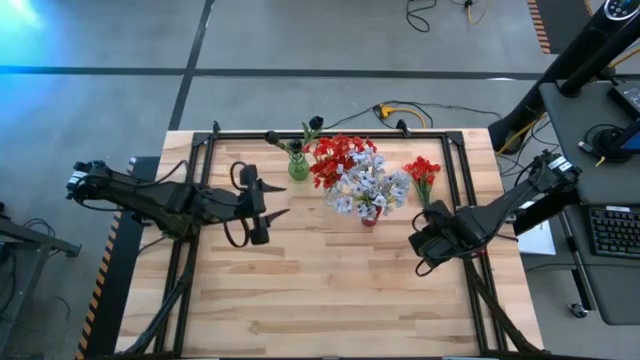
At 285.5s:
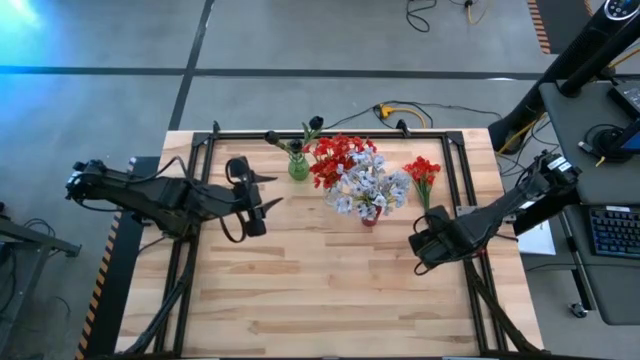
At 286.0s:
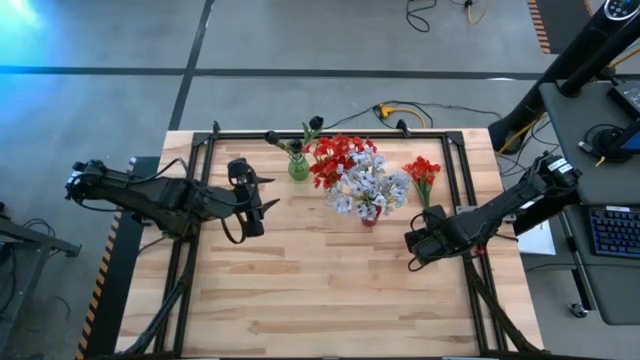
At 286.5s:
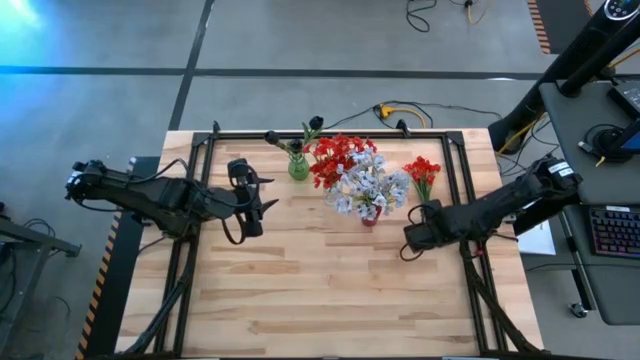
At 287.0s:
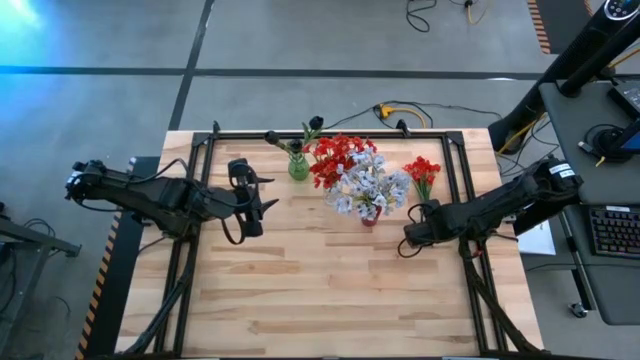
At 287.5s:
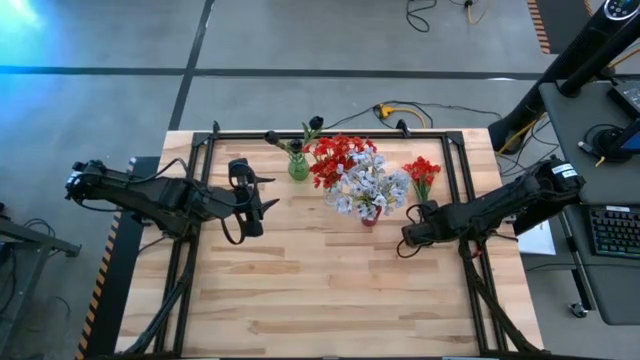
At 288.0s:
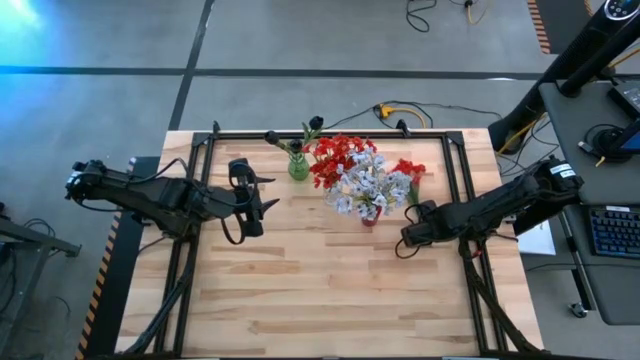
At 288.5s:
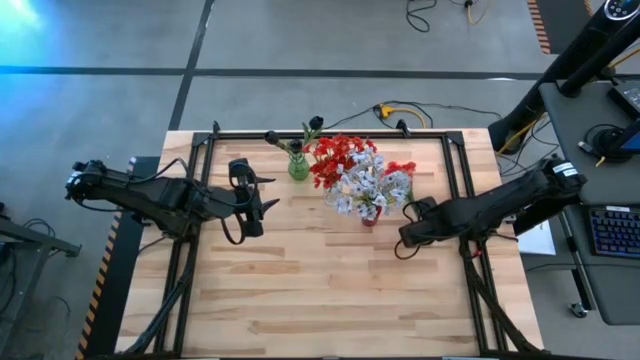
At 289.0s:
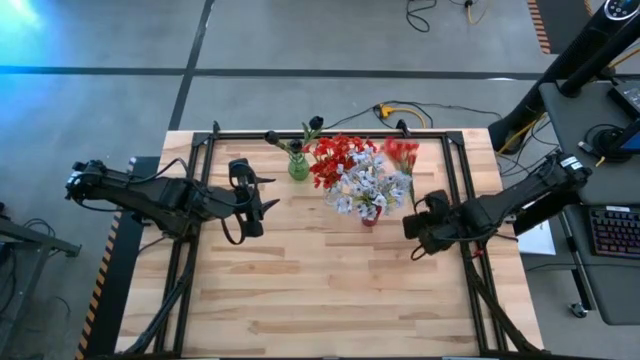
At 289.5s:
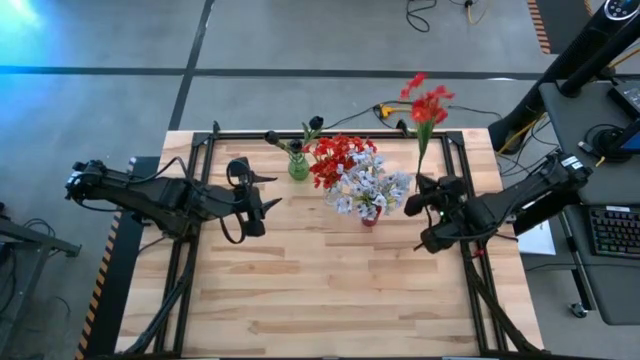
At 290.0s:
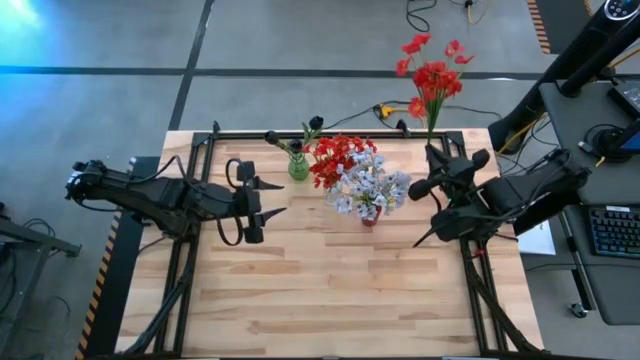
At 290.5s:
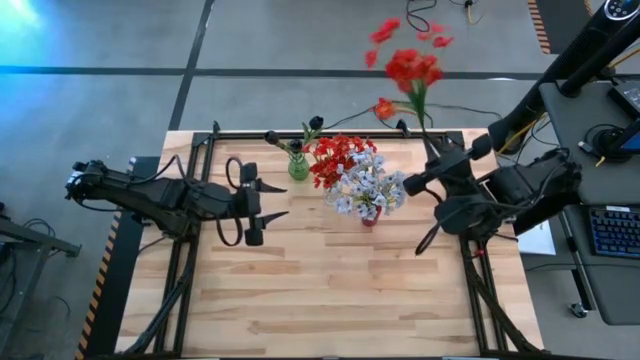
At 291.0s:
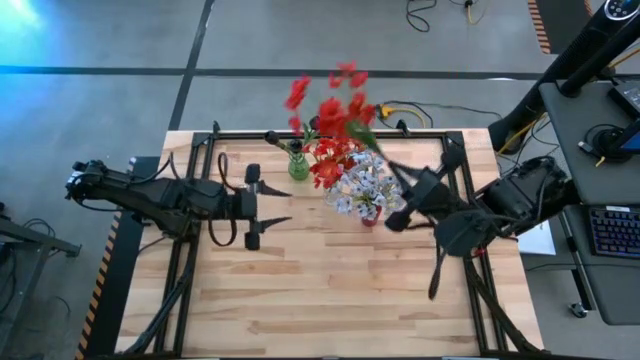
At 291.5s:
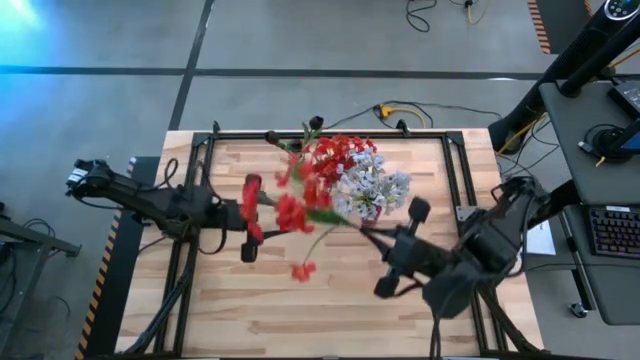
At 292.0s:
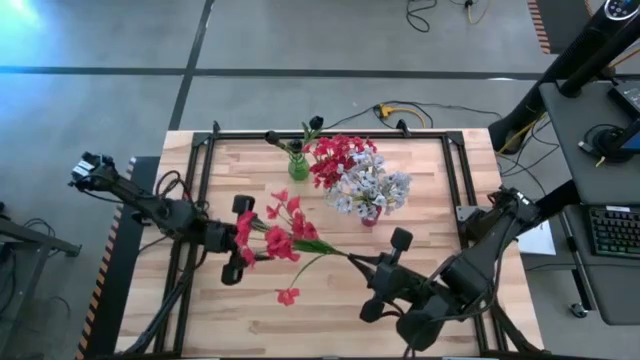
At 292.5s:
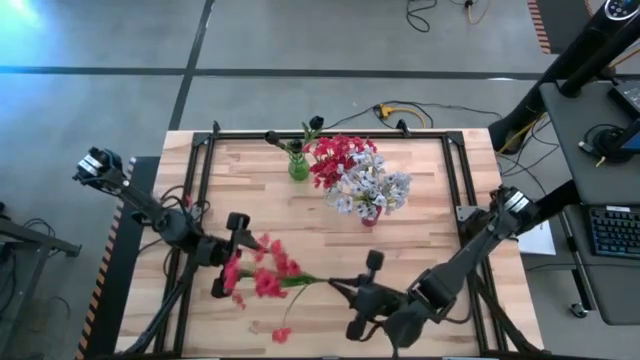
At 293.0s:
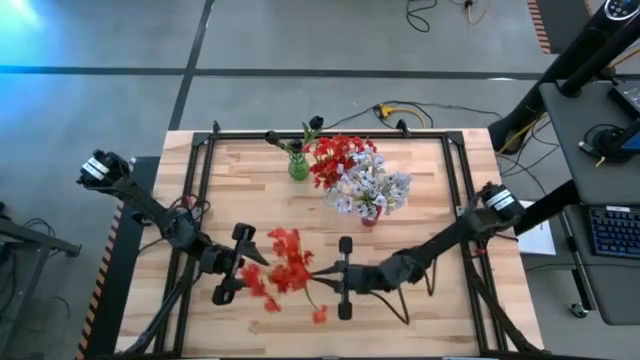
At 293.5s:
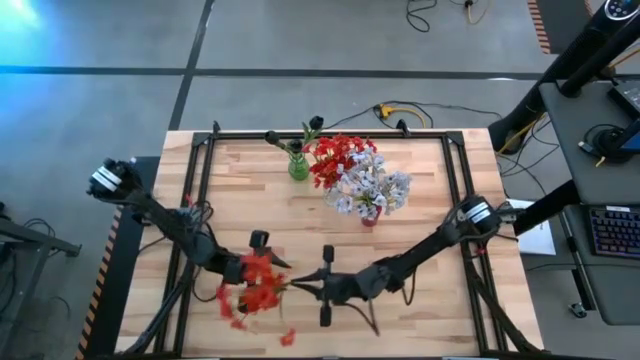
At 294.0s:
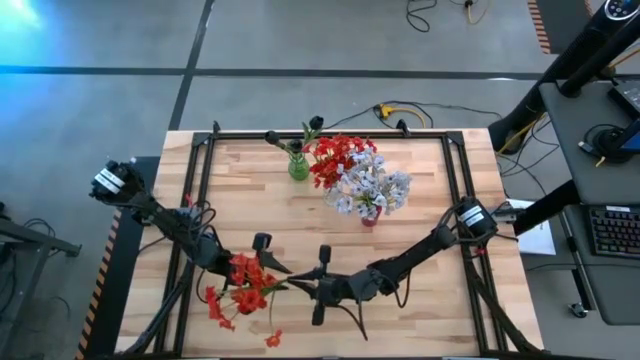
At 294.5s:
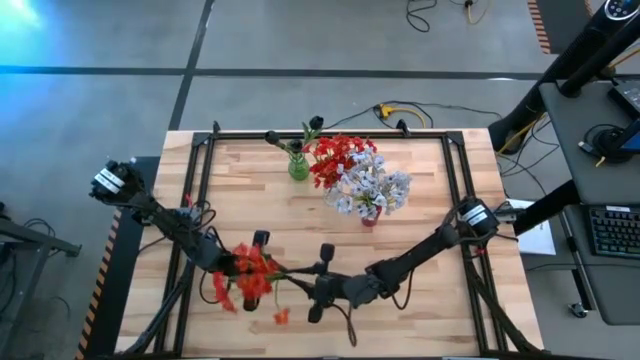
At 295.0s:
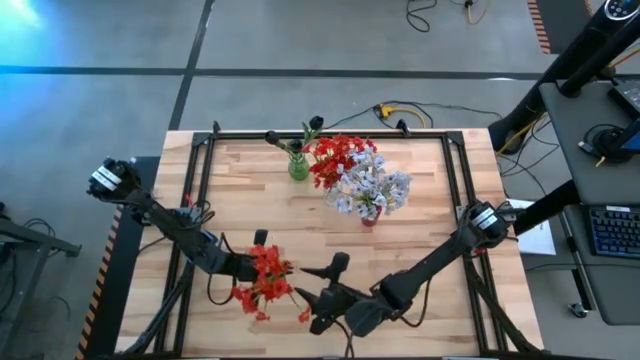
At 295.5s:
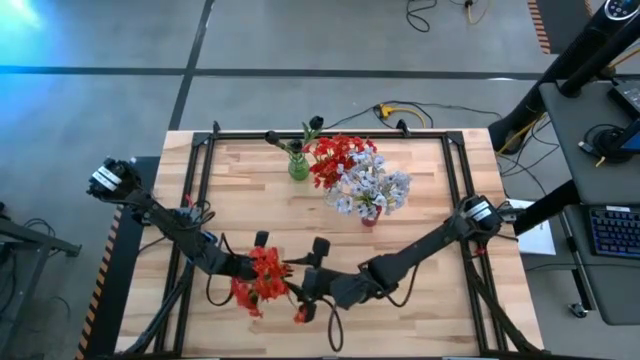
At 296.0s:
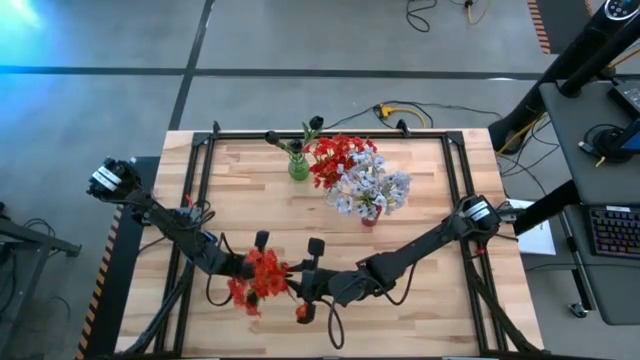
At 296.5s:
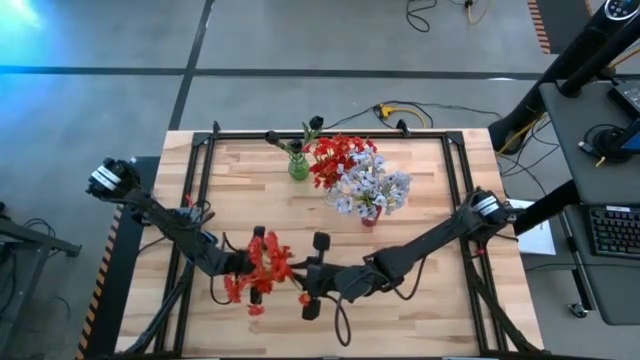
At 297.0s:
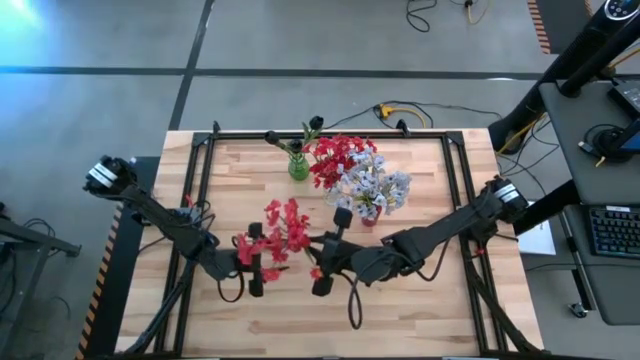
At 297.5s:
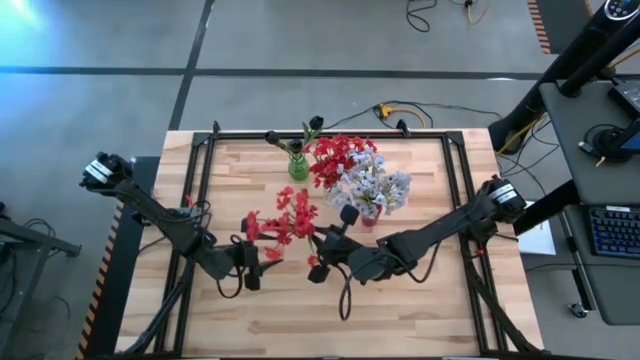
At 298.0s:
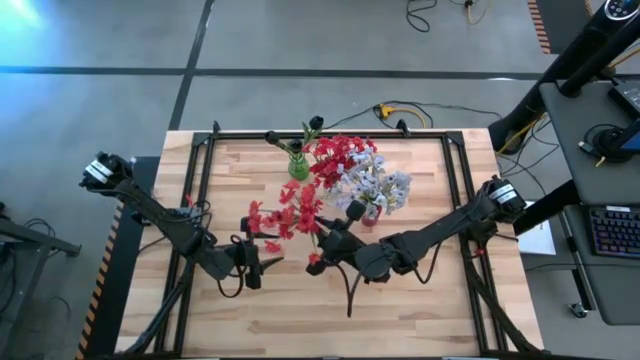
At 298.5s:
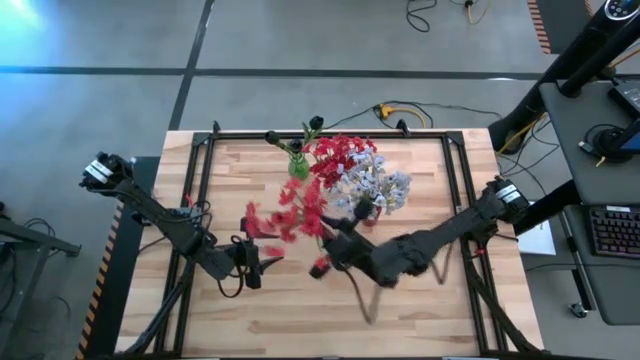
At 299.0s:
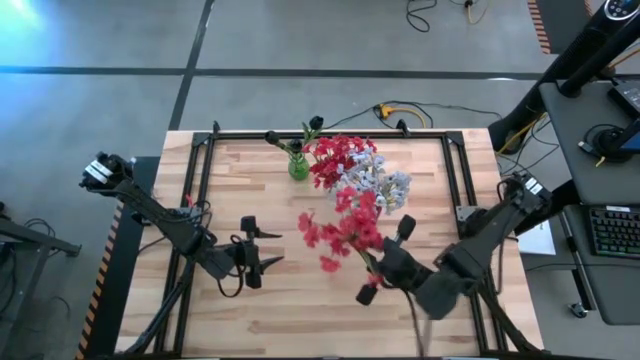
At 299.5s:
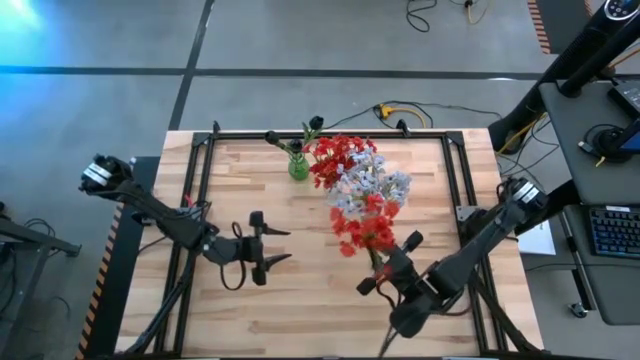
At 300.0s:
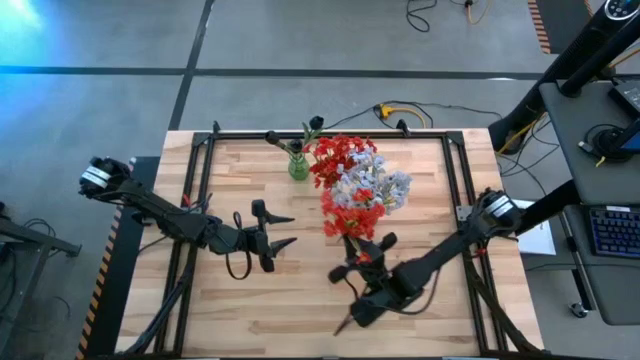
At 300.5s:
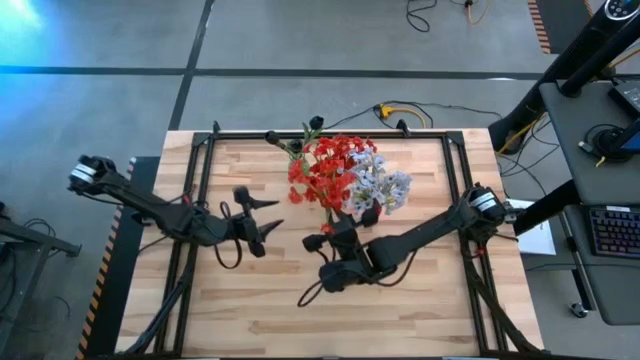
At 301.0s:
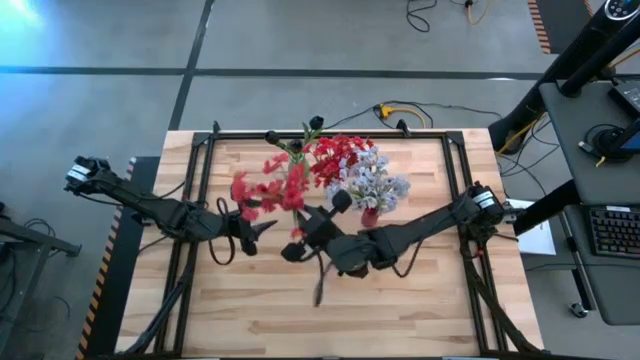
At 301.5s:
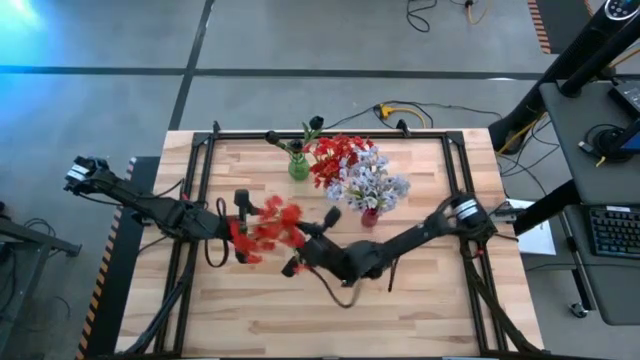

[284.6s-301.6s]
Task: Sort flowers into vase by color
Put the orange flowers into the transparent vase

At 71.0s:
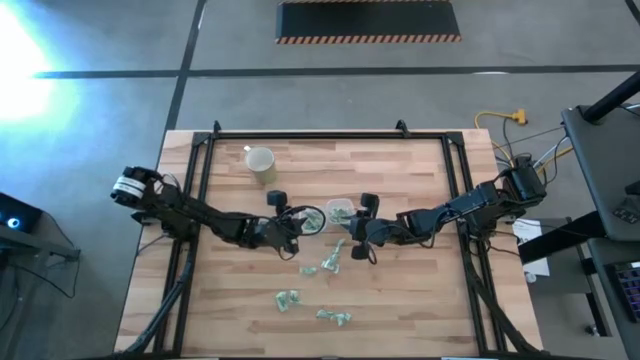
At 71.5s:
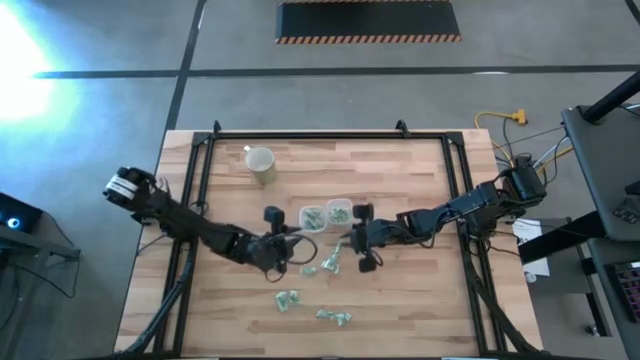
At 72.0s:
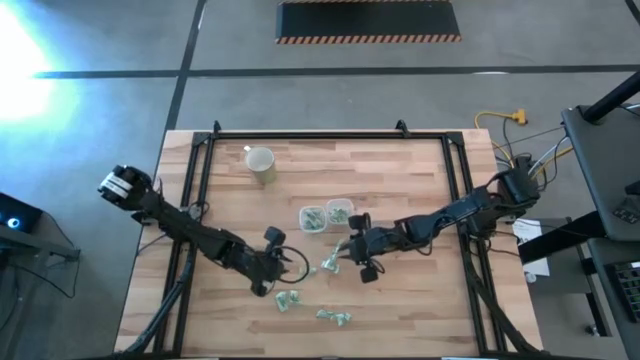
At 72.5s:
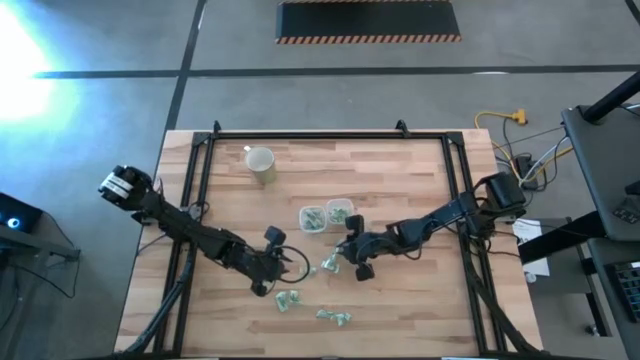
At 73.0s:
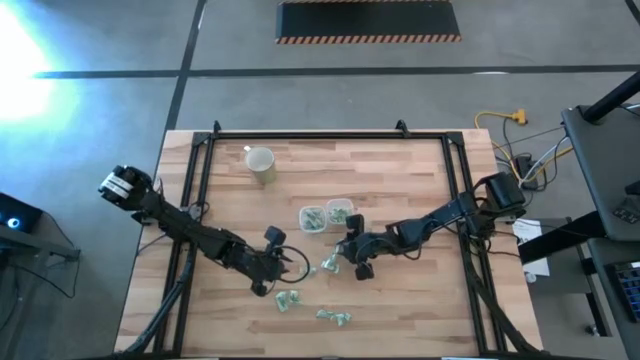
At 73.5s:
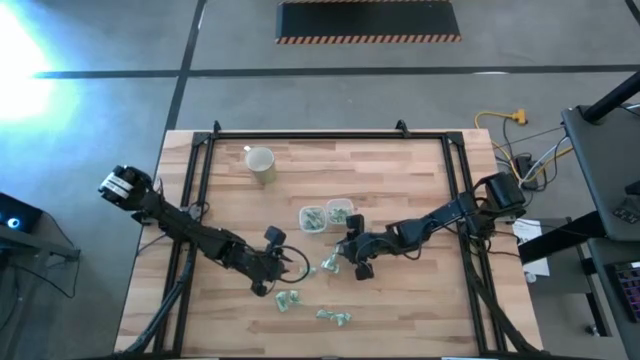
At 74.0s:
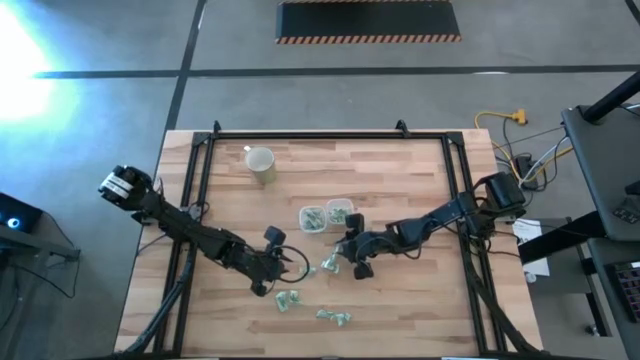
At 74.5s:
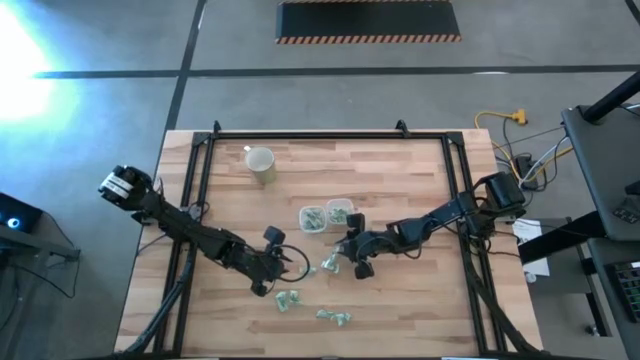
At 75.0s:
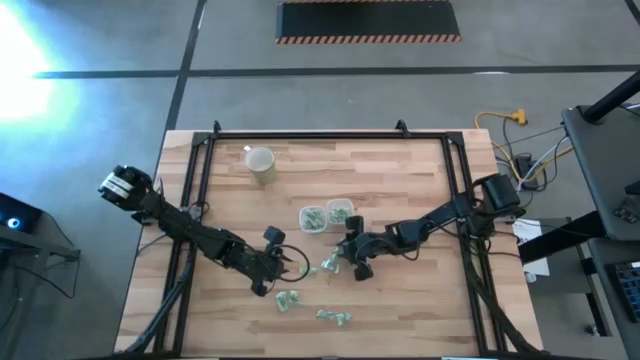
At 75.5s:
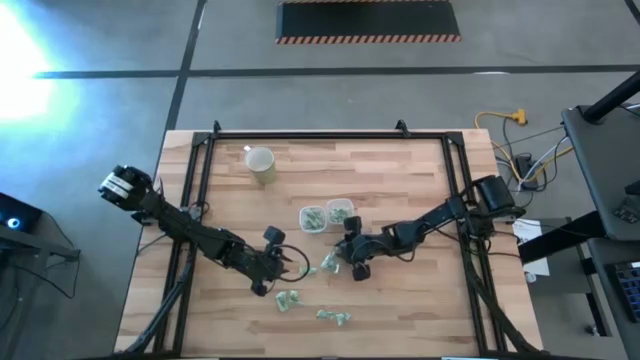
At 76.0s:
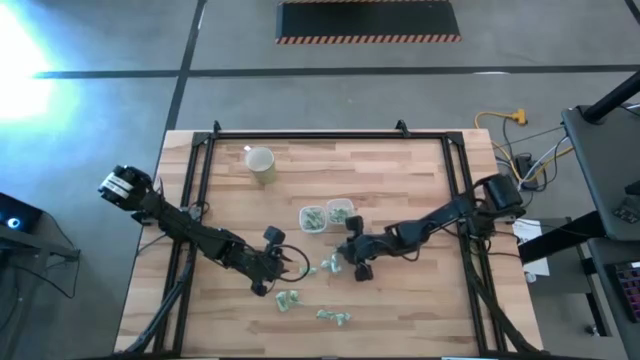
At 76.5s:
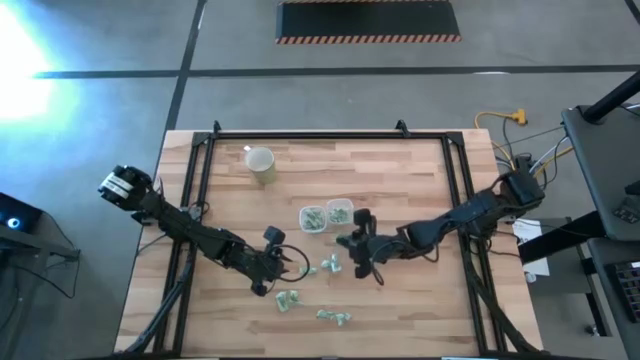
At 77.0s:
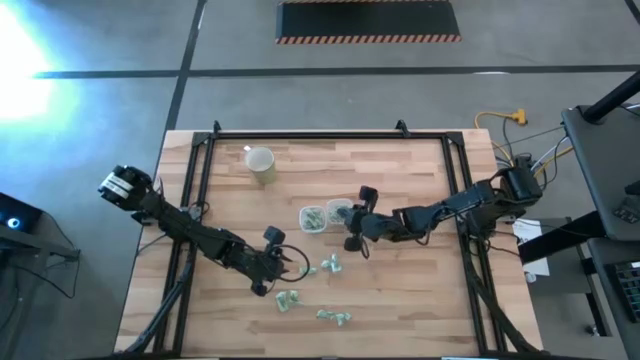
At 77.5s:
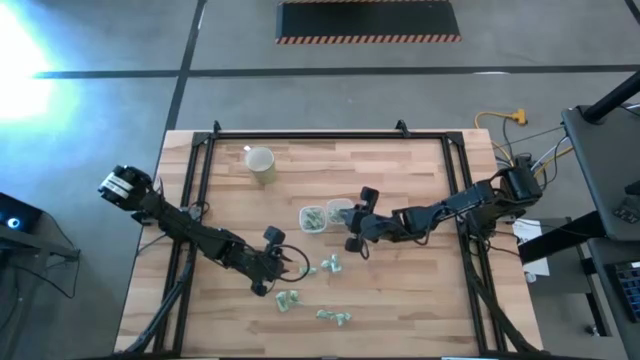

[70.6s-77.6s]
Task: Pick and place items into bin
Put the stevia packet into the right transparent bin
